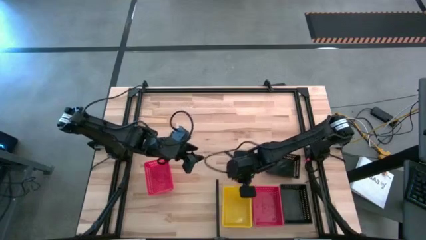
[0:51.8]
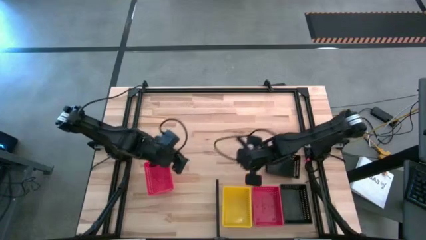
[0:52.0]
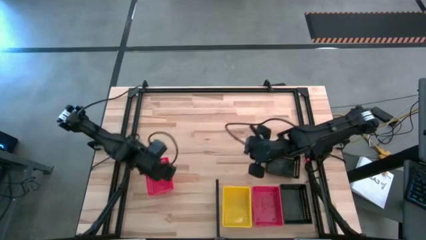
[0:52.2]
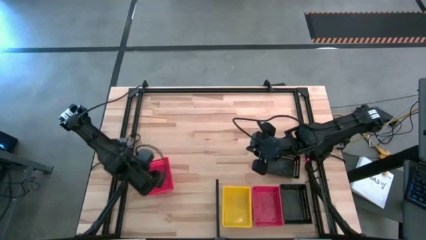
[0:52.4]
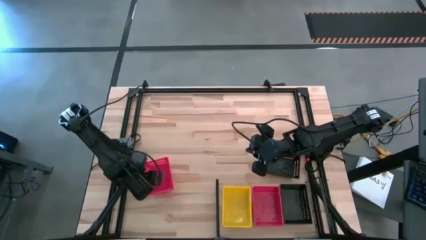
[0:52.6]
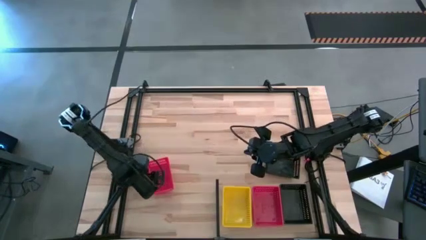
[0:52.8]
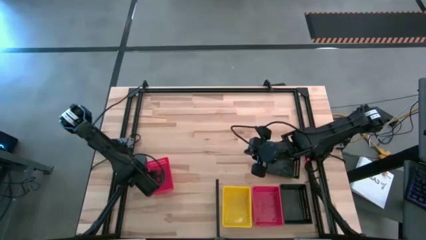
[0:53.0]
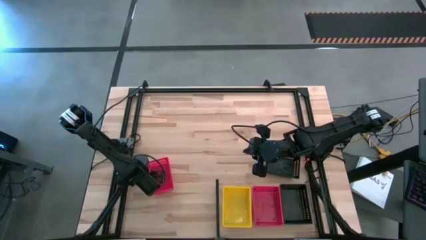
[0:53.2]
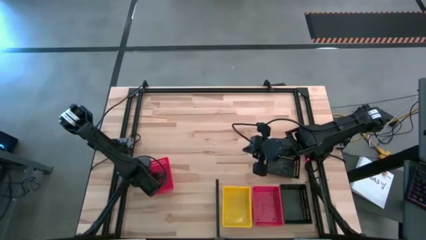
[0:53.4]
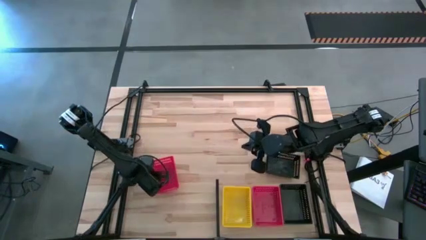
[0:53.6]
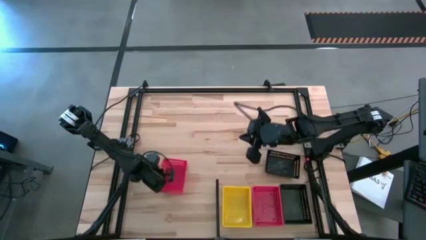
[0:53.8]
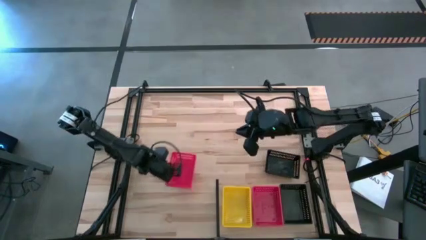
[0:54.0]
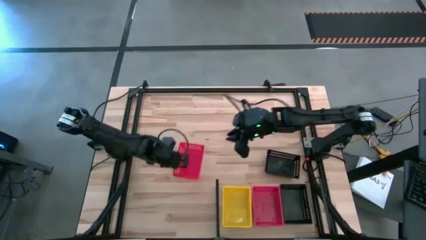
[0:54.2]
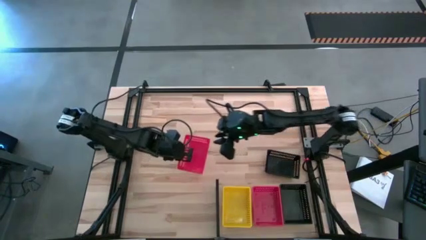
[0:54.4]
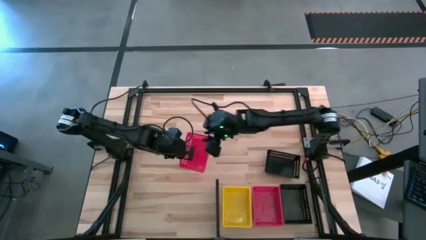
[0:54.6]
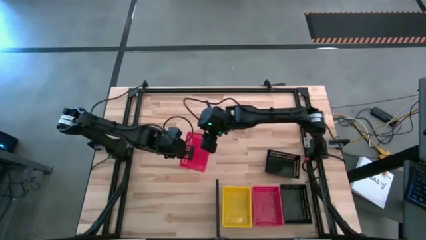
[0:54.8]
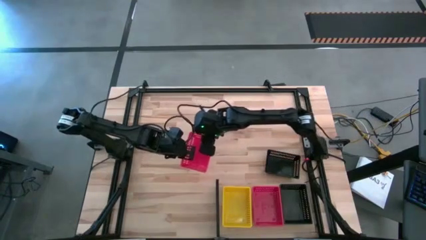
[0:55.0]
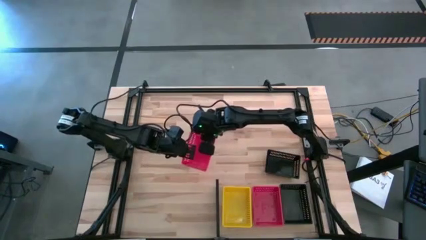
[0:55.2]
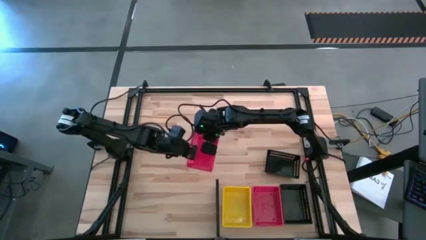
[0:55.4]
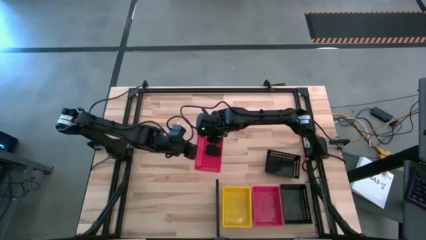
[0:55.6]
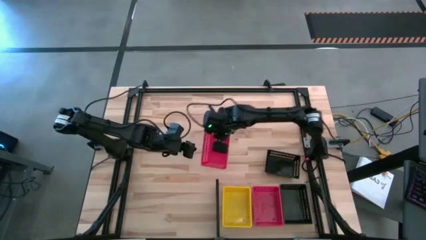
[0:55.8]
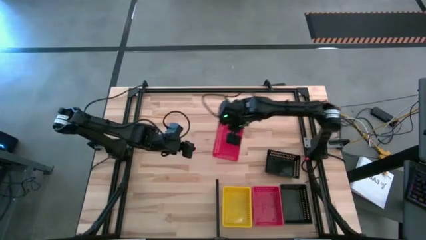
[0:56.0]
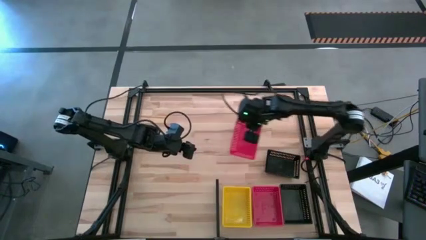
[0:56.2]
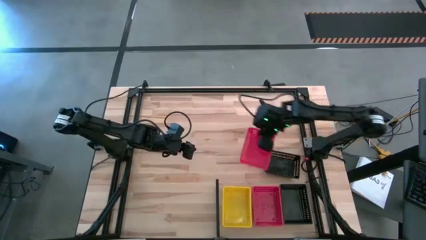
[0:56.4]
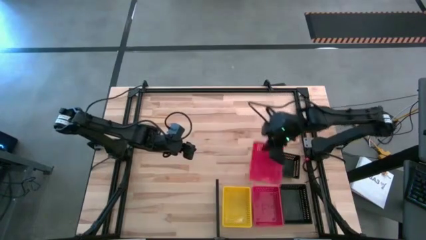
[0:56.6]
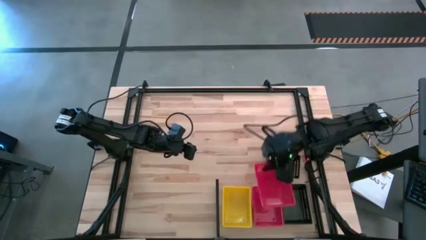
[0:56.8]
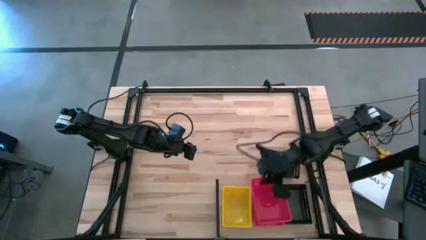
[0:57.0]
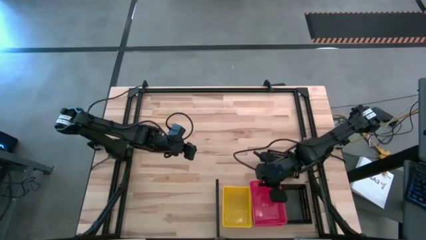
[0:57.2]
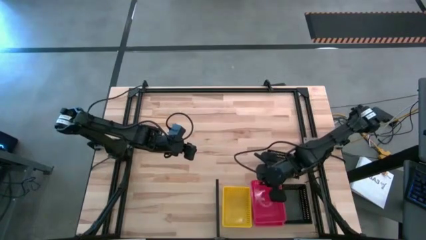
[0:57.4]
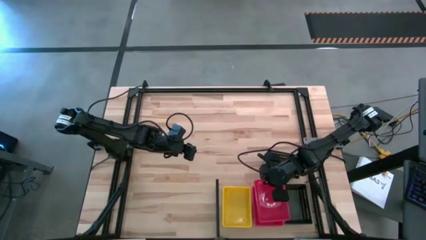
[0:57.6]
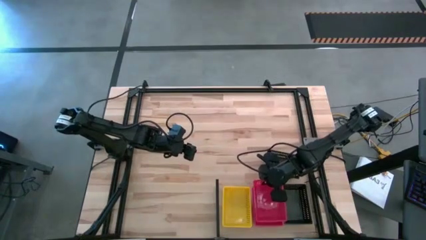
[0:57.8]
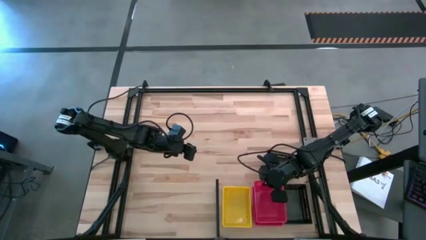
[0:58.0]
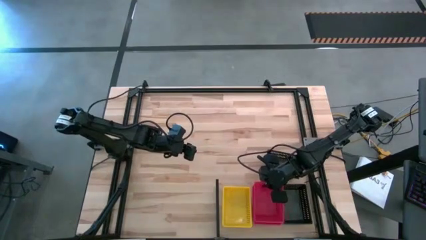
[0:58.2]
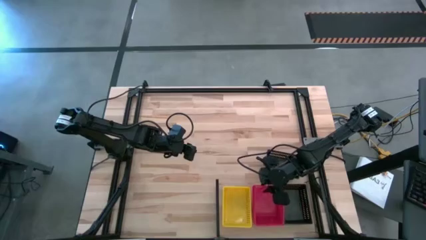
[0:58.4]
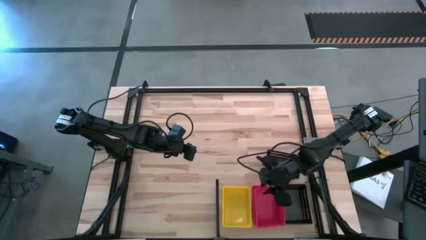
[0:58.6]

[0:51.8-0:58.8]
Task: Stack baskets on shelf by color
Stack the red bin on top of the red bins on the shelf

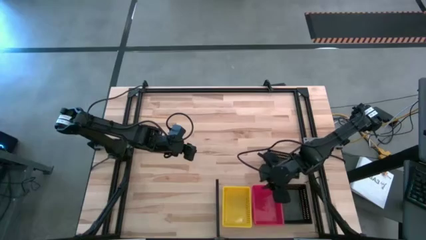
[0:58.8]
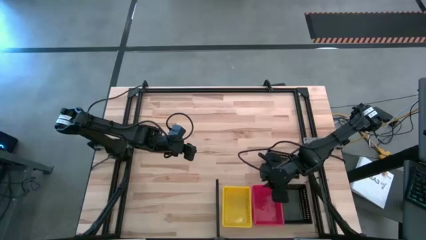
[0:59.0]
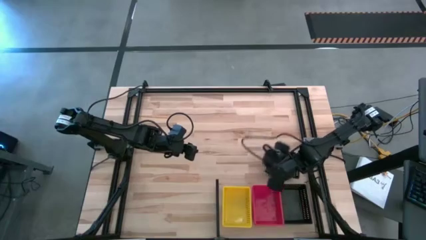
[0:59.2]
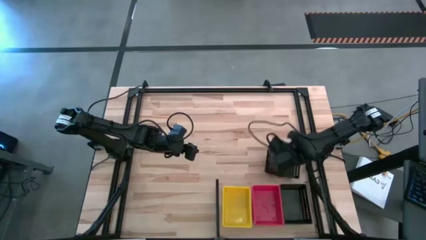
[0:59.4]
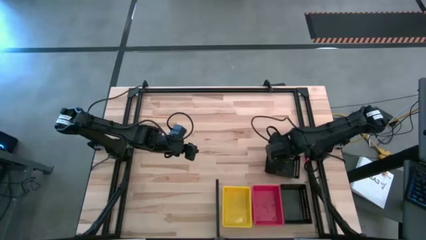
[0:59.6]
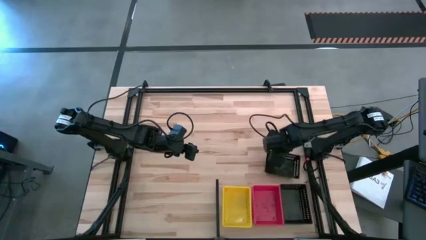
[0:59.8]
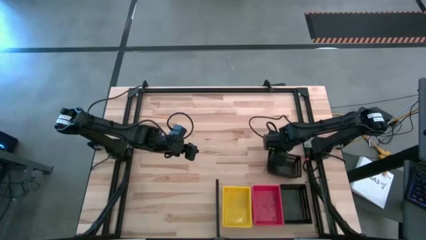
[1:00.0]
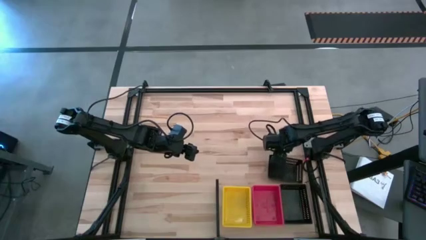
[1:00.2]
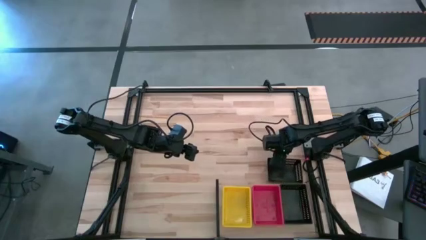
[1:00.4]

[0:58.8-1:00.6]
Stack the black bin on top of the black bins on the shelf

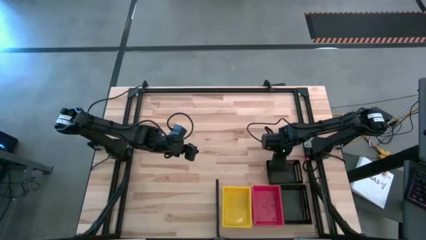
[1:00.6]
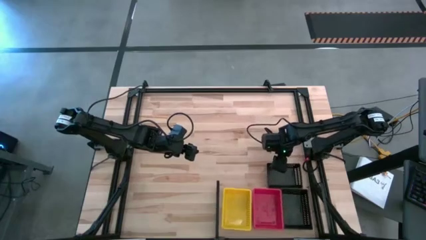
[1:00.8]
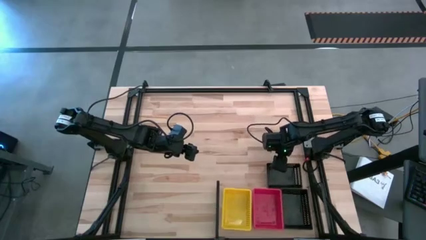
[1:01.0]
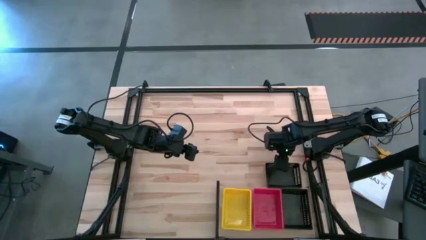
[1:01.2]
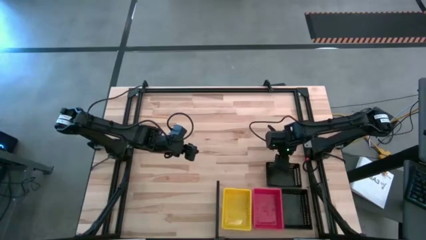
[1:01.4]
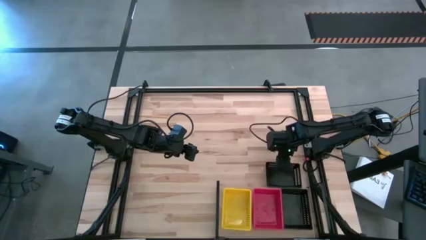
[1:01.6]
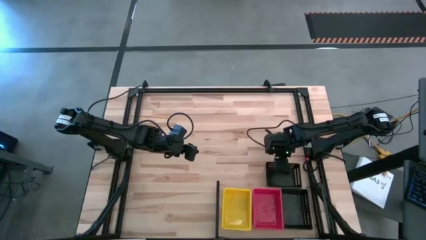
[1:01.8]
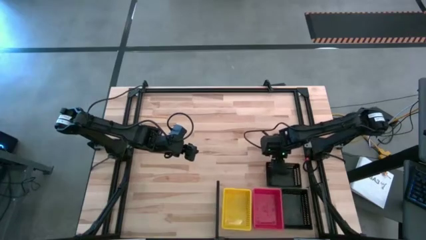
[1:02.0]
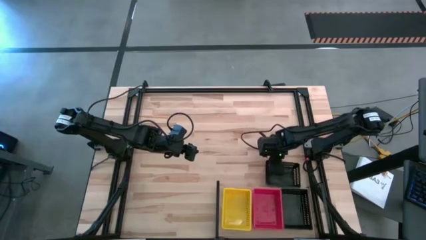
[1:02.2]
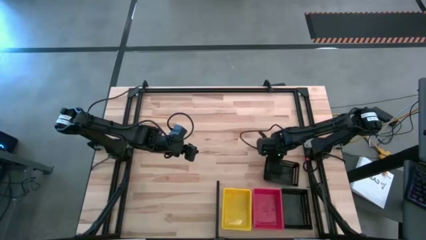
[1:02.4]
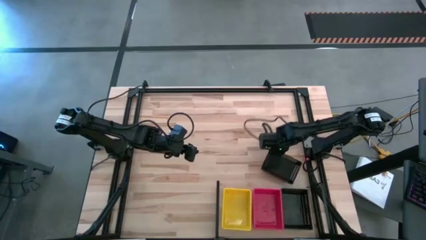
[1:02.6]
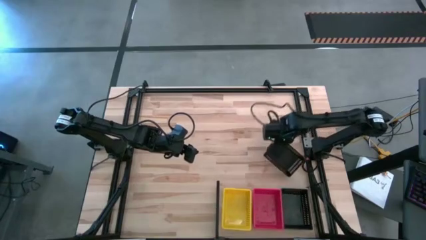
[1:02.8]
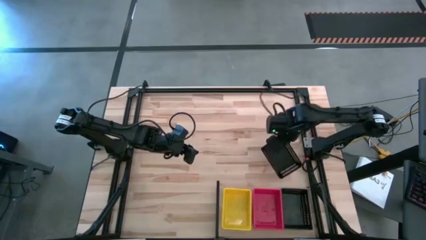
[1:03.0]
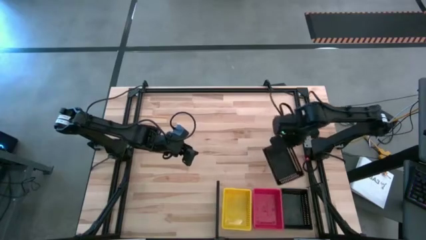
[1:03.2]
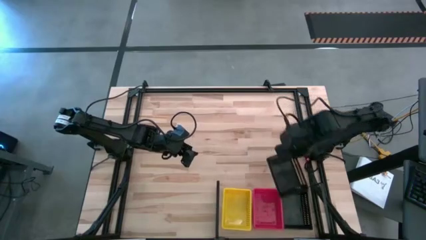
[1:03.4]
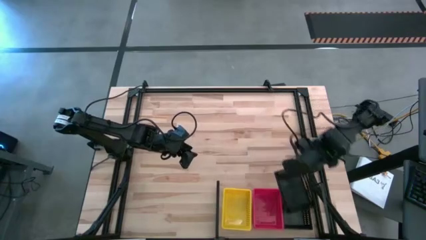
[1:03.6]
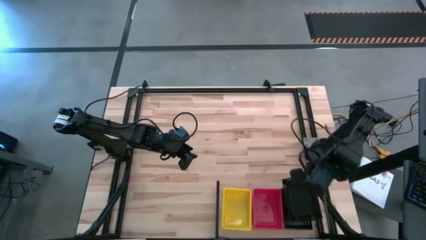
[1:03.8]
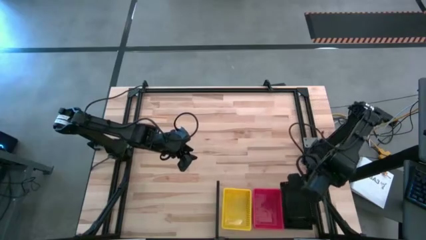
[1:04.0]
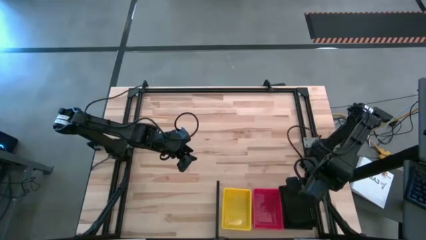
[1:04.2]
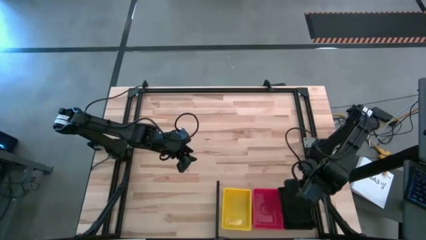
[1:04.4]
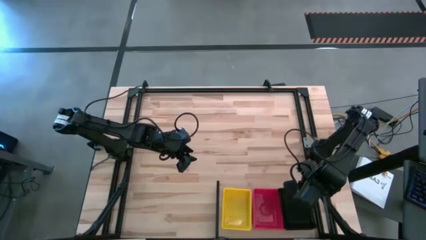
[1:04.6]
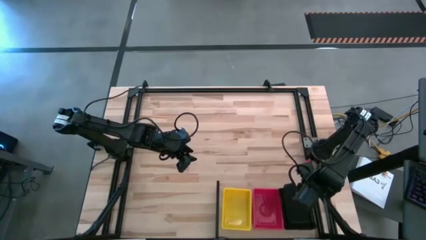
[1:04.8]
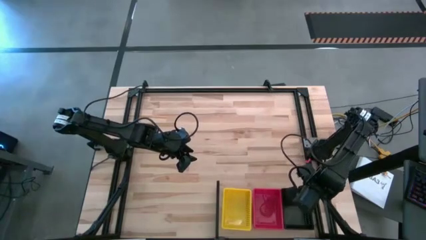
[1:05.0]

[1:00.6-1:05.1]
Stack the black bin on top of the black bins on the shelf

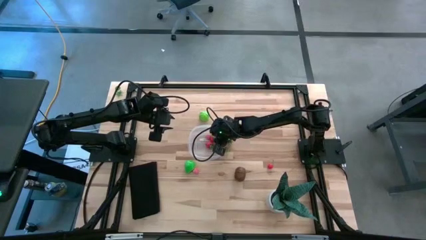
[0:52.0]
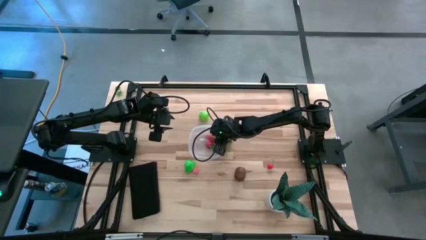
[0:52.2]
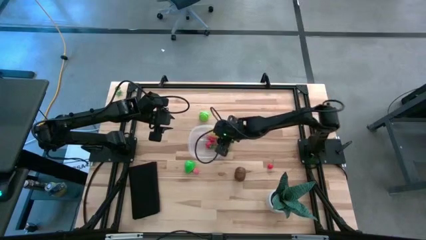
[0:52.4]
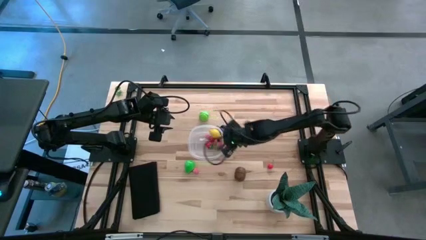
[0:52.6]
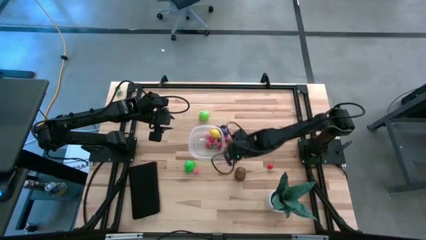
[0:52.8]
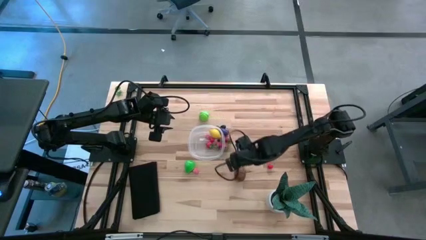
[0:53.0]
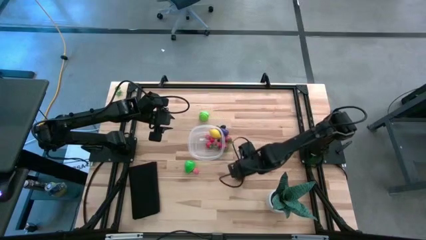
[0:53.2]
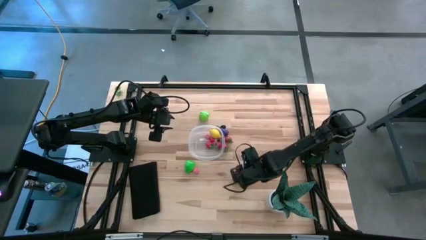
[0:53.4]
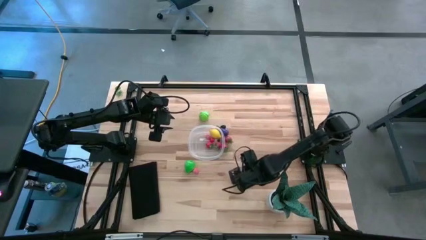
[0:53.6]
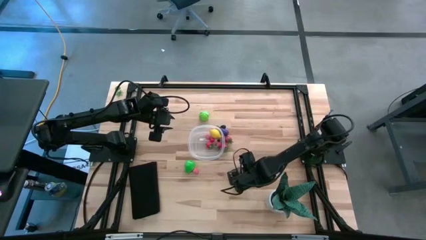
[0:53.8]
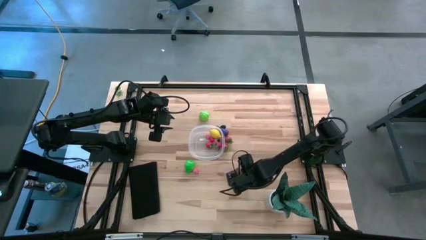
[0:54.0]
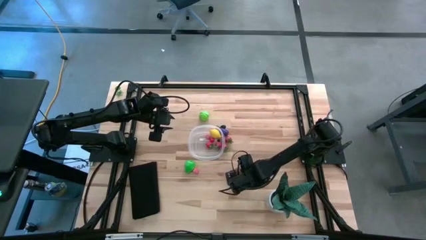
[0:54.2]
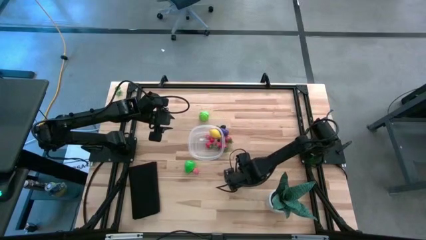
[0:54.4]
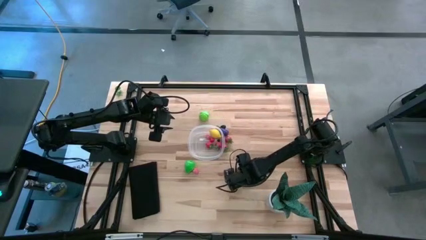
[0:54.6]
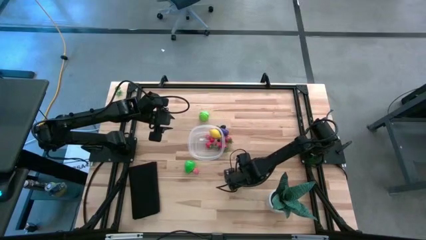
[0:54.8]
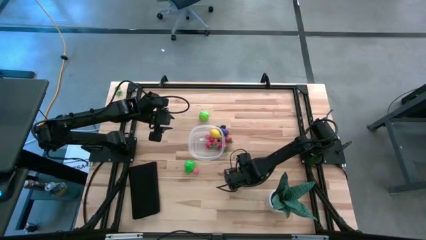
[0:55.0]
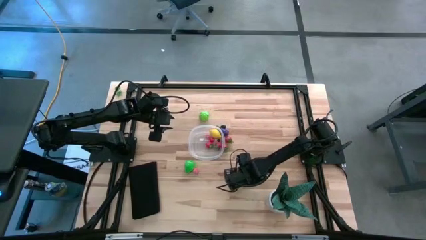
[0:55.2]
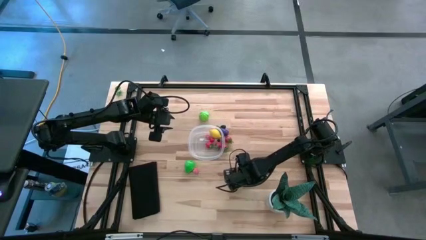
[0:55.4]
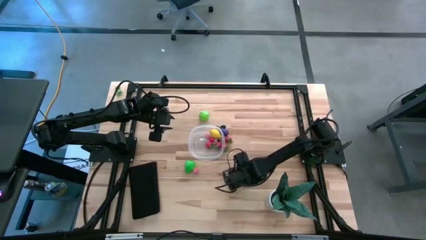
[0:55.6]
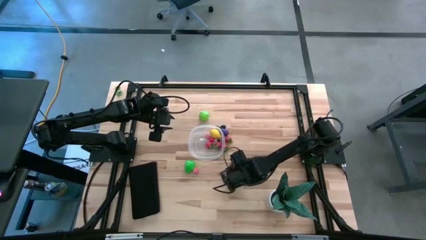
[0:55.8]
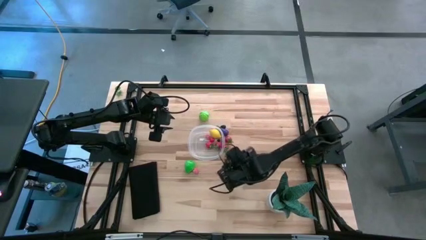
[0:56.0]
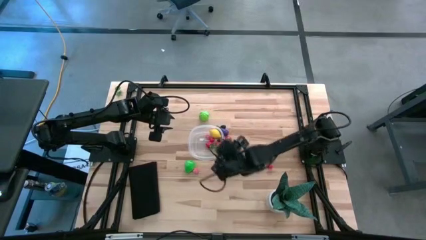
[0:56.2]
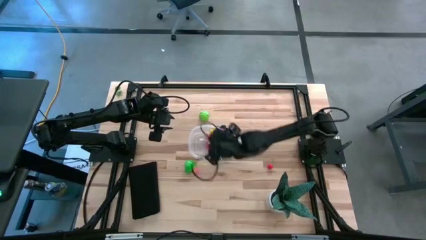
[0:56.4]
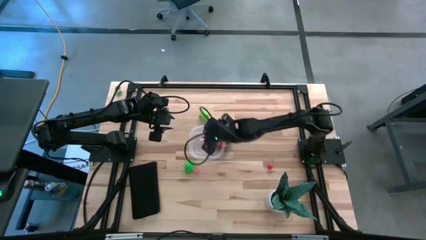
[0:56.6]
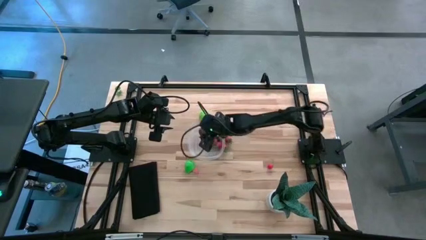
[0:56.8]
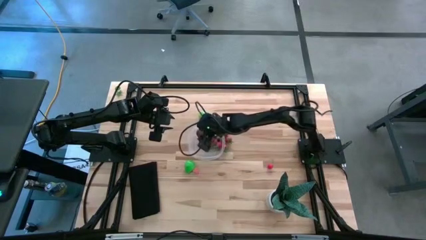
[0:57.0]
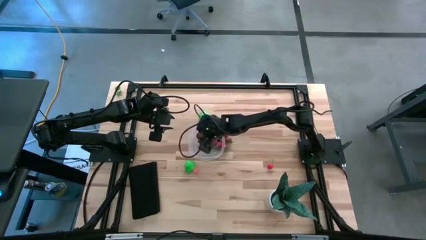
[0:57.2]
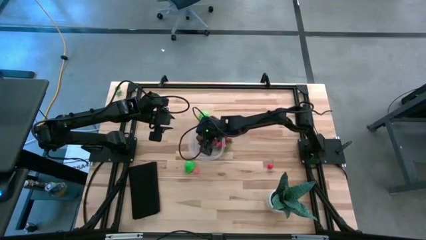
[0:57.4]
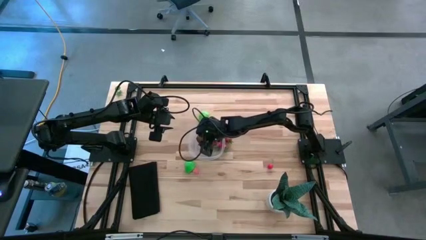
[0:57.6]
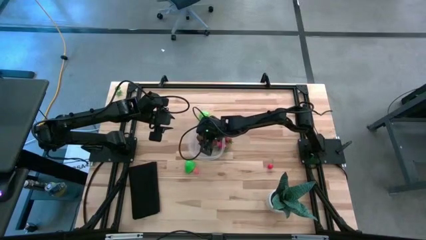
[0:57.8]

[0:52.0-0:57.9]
Task: Pick and placing Produce into tupperware
Put the kiwi into the transparent bin
